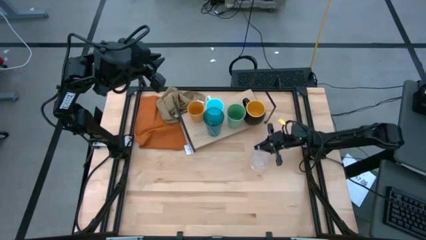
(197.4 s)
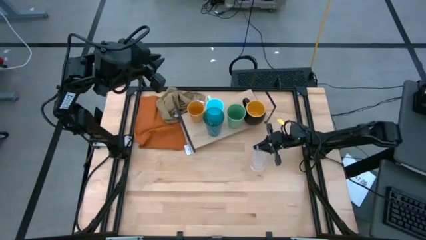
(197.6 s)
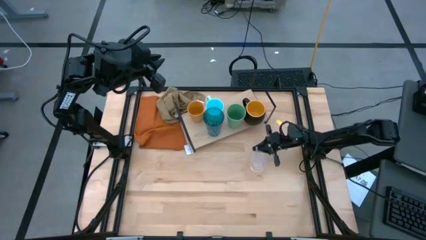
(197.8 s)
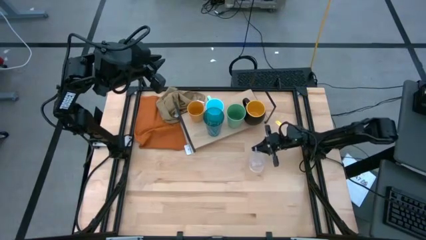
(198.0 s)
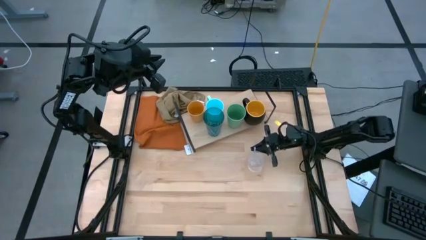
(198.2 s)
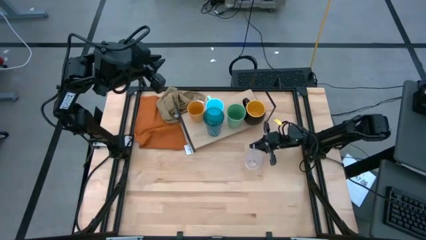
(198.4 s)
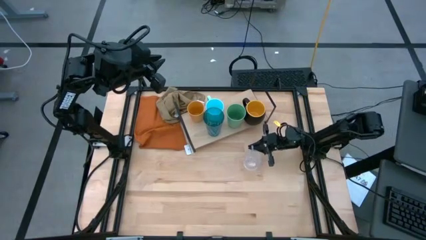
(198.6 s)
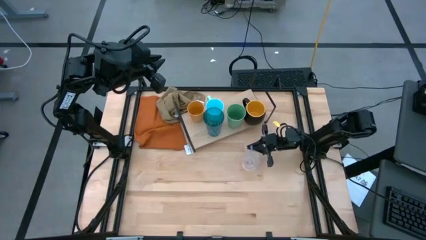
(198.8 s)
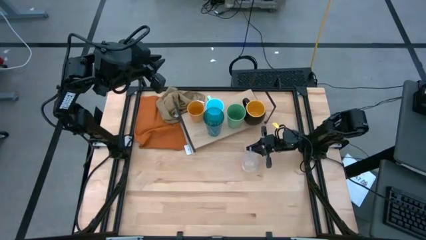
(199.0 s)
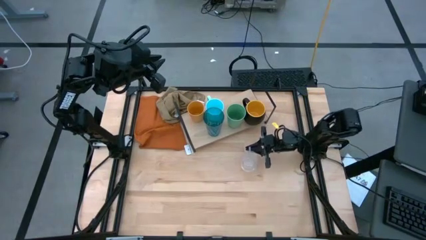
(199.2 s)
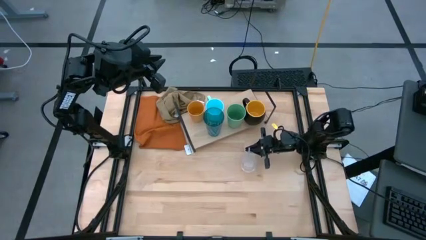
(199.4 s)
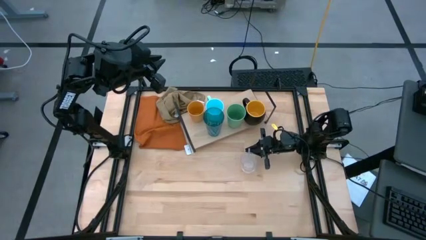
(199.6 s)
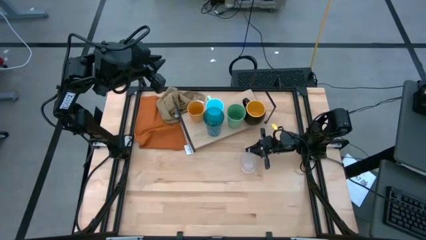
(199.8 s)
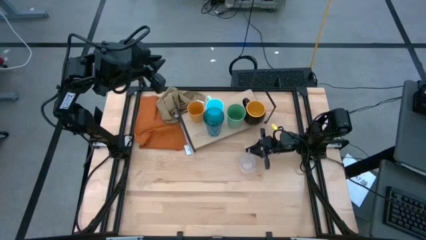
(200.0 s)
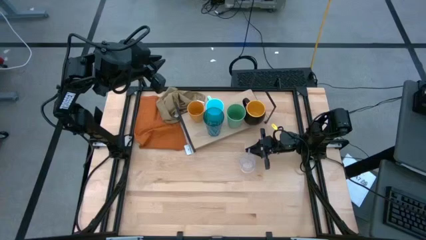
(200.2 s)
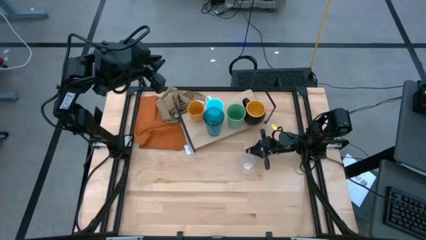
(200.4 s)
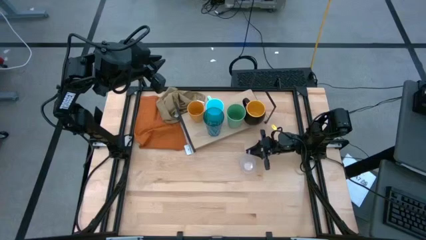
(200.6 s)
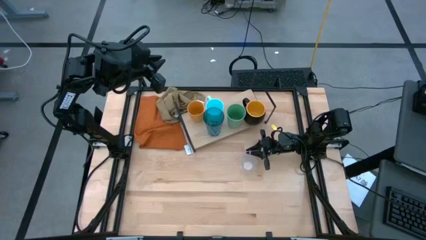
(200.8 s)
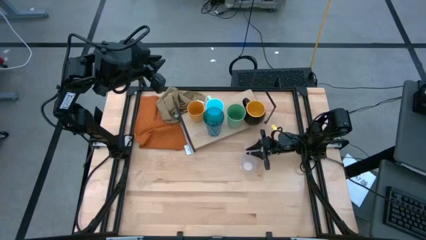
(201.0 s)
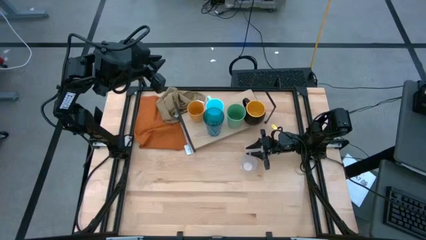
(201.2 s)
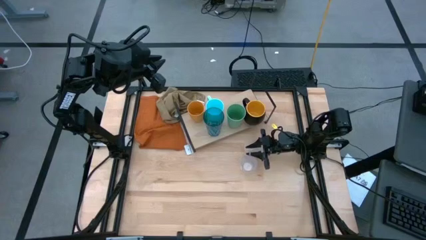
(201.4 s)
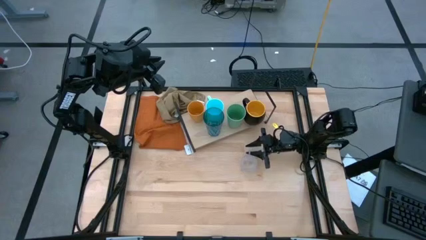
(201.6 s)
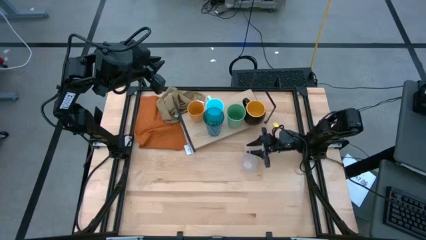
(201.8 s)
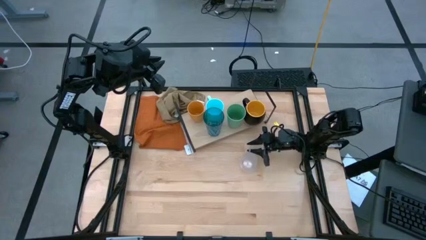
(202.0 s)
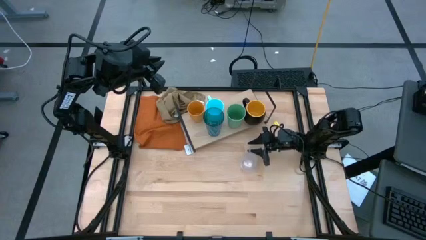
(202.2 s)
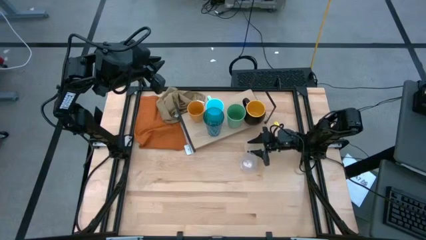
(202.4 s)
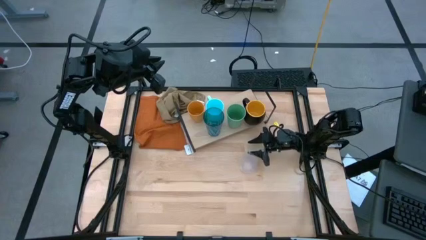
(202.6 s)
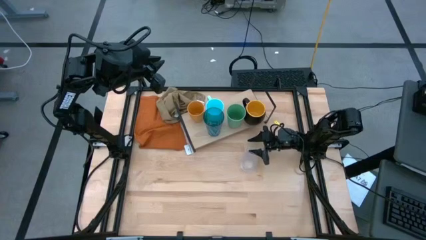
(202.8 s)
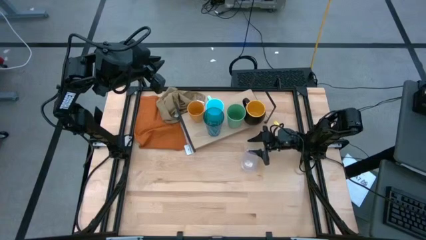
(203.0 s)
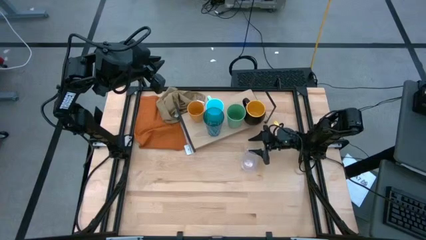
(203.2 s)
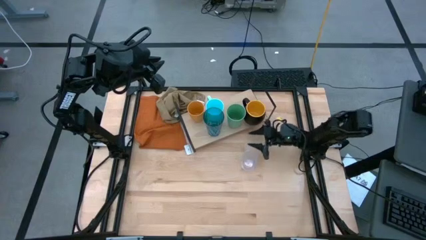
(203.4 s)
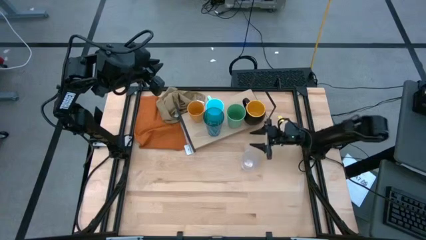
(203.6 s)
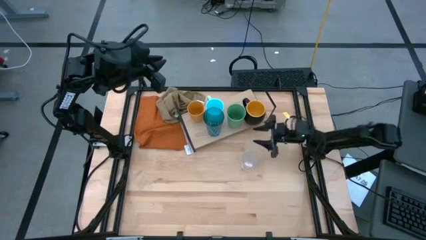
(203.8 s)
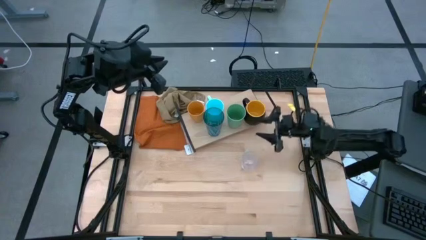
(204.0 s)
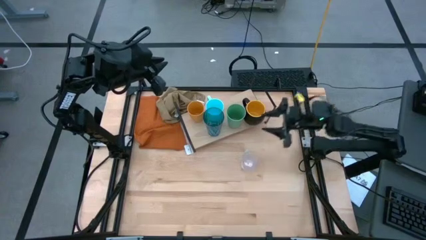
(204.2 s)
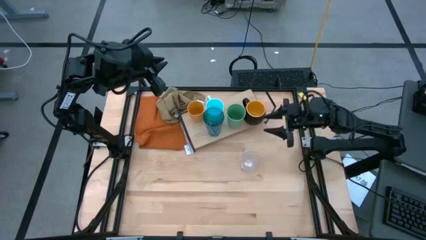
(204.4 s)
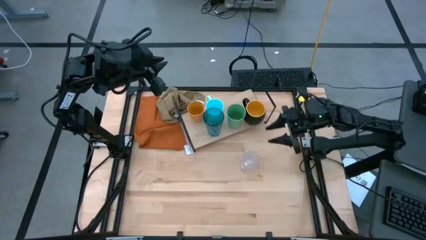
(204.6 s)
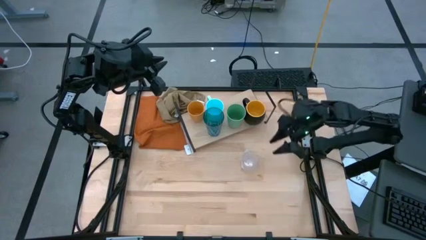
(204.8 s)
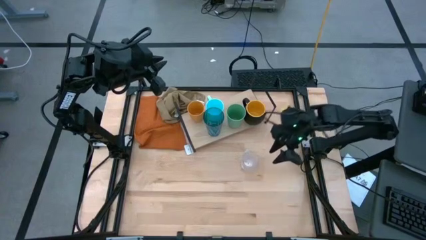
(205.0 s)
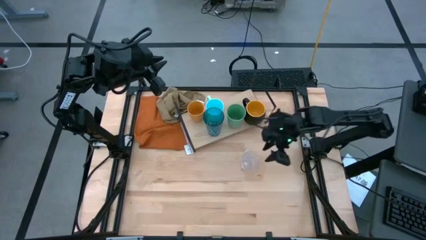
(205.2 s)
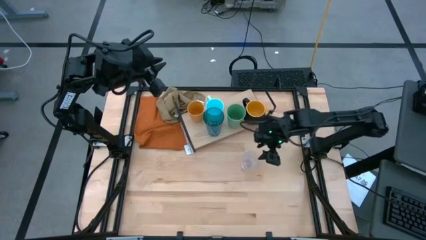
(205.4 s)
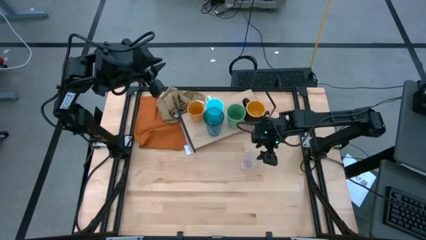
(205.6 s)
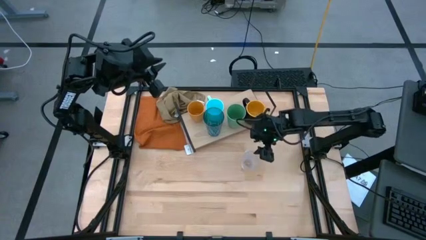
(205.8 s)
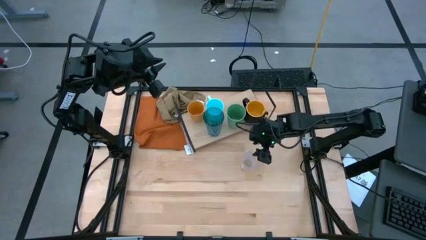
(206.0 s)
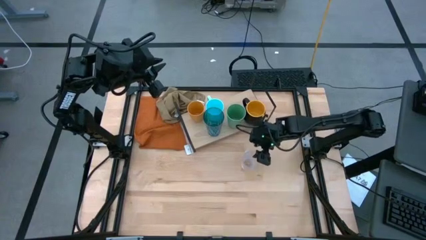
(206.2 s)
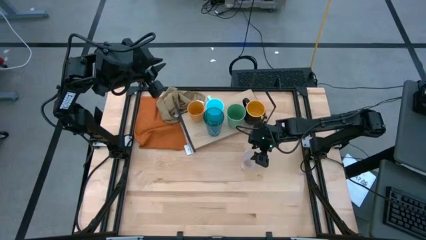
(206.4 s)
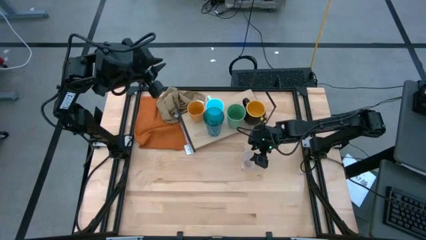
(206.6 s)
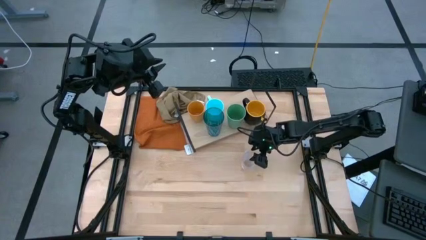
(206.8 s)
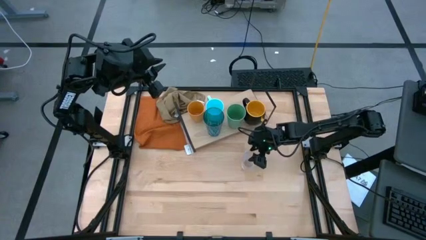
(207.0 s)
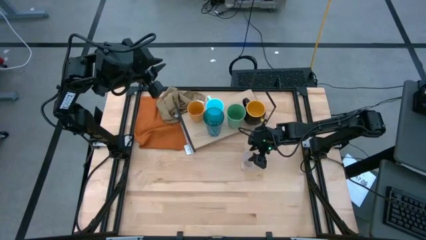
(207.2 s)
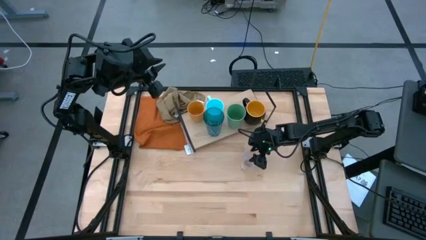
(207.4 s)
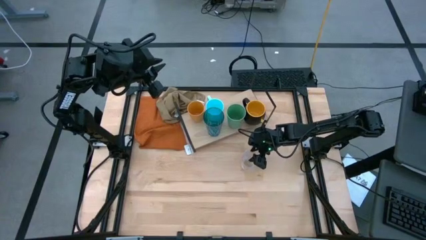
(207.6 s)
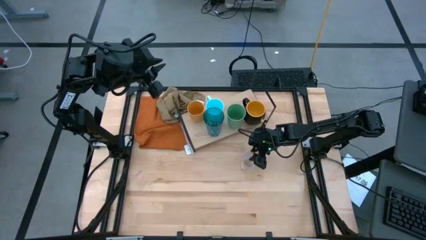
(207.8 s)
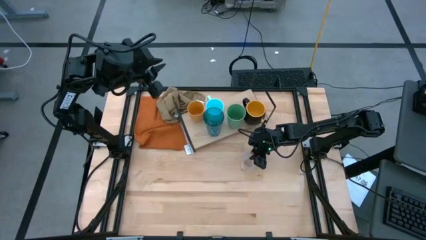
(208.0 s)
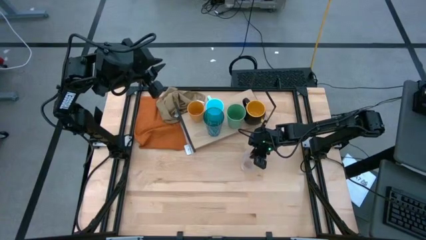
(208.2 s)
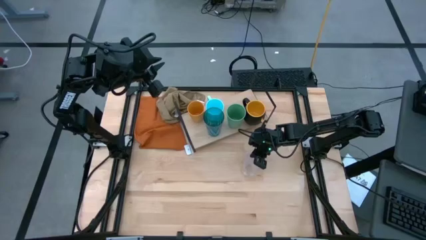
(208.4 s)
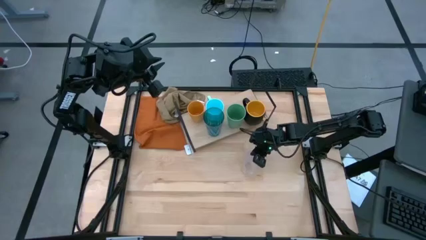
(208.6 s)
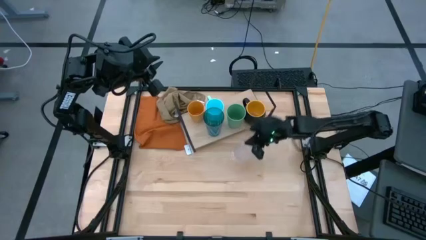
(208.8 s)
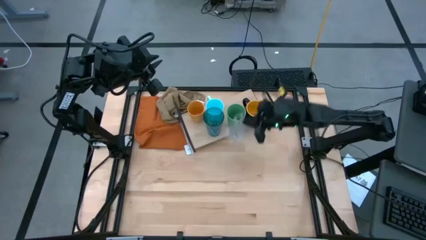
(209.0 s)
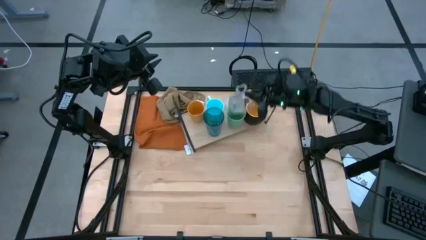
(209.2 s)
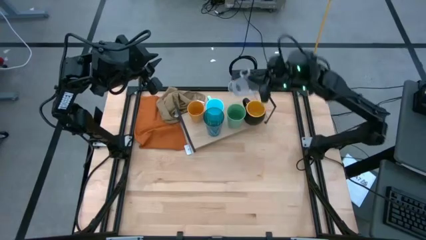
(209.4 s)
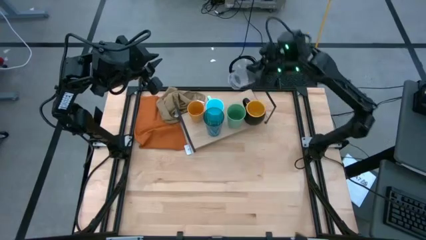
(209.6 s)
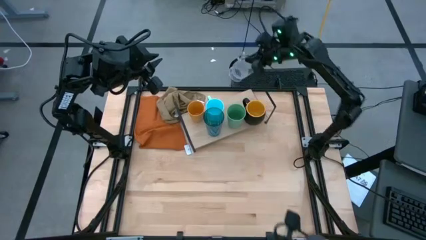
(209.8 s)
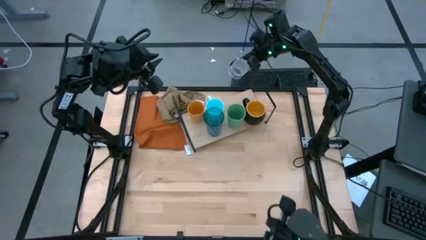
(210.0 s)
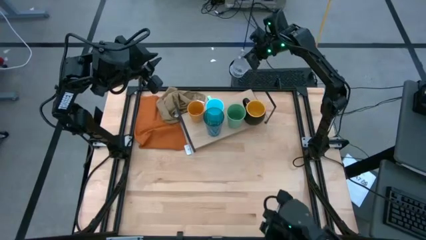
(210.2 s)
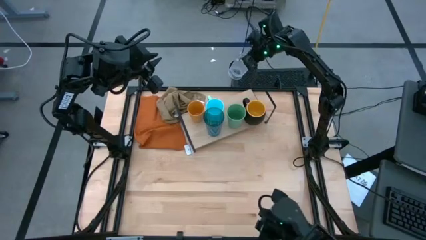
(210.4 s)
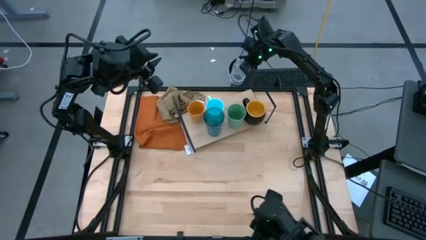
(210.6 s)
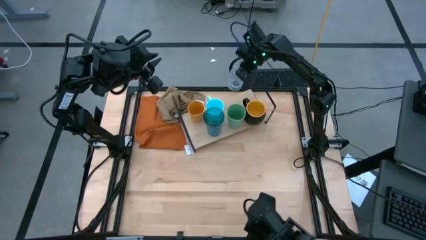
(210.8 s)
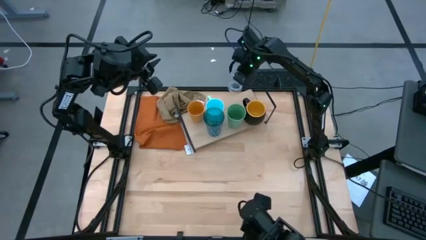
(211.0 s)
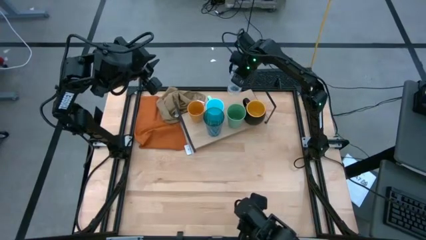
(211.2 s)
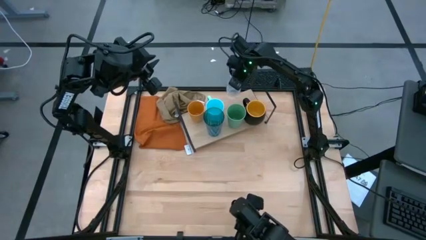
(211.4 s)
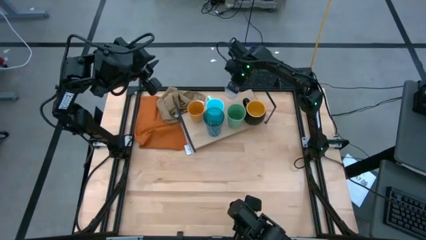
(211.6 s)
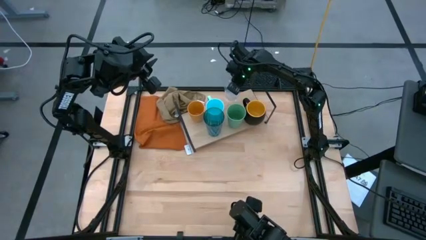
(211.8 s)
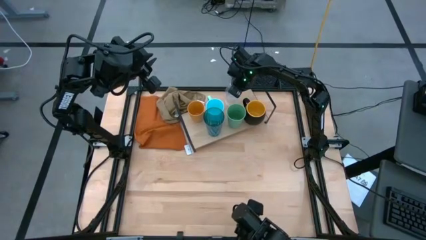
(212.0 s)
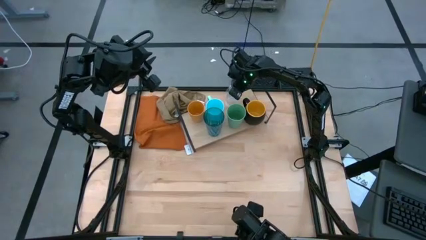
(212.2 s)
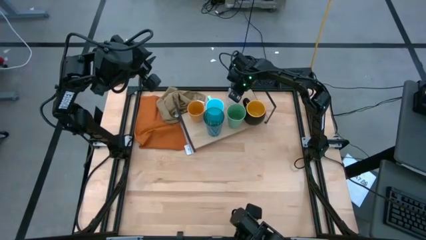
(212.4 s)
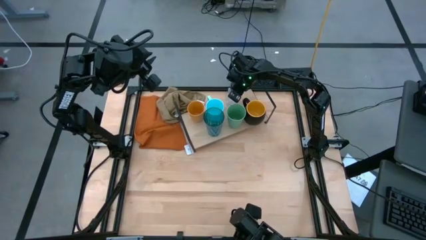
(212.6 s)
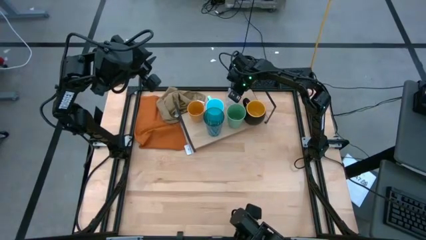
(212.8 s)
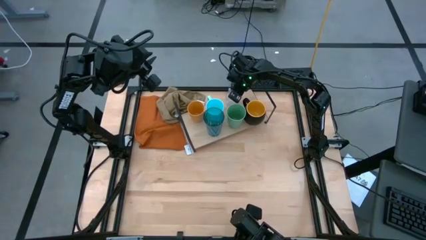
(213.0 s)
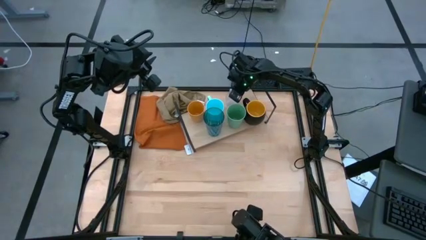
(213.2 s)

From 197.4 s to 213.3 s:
Task: Stack small to large cups/mugs on shelf
Put the transparent mug on the shelf
